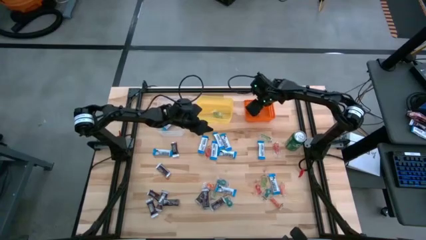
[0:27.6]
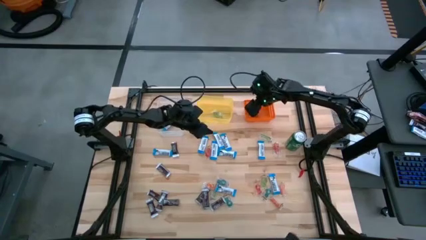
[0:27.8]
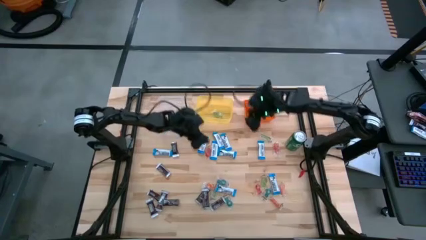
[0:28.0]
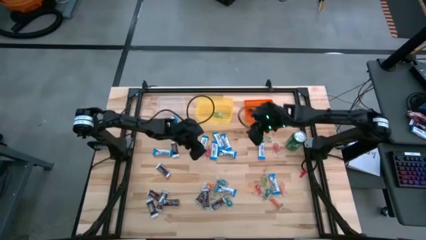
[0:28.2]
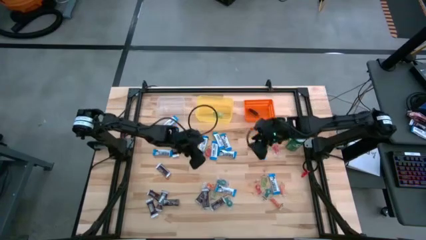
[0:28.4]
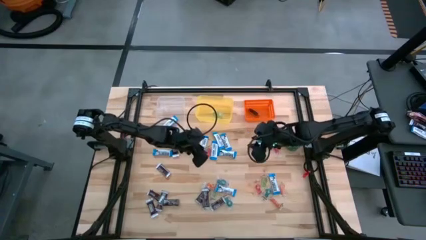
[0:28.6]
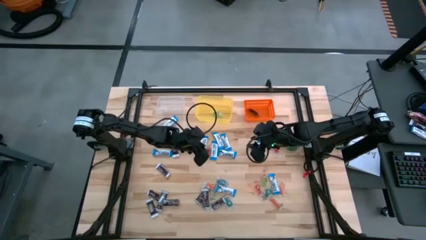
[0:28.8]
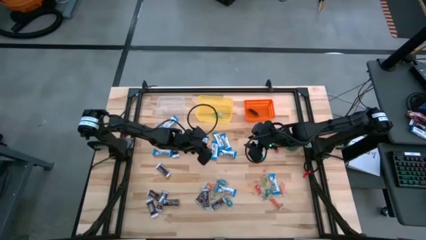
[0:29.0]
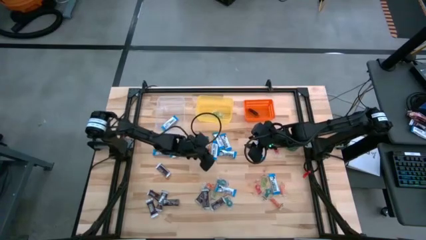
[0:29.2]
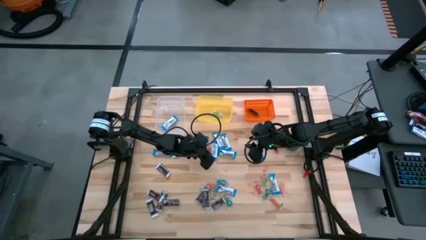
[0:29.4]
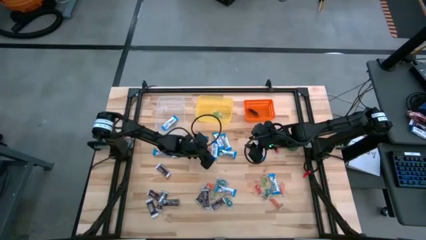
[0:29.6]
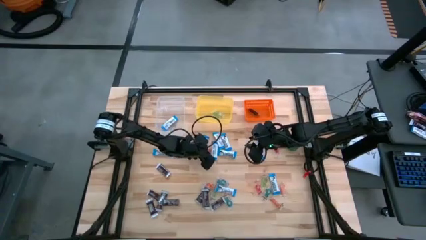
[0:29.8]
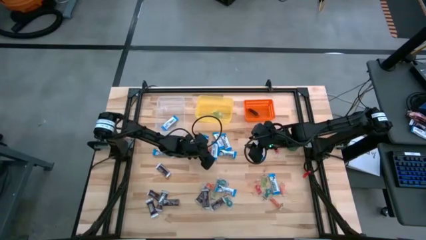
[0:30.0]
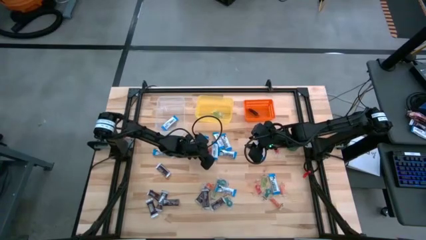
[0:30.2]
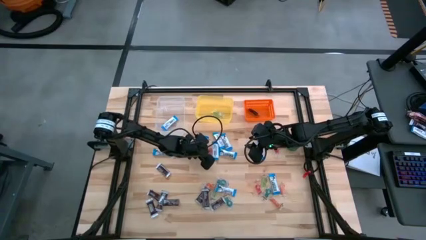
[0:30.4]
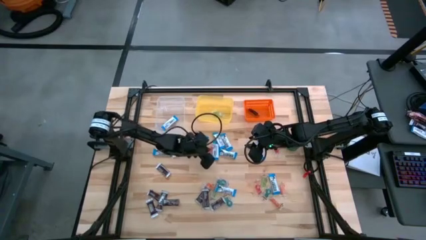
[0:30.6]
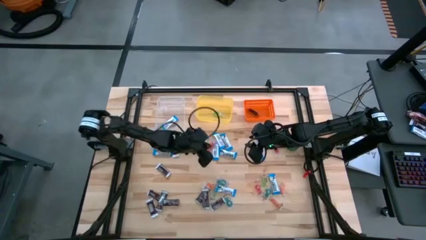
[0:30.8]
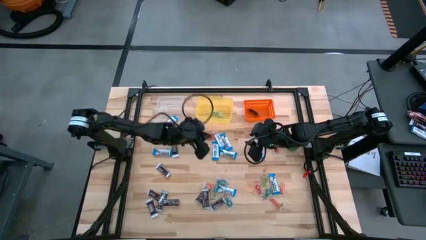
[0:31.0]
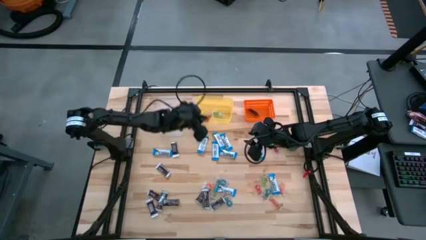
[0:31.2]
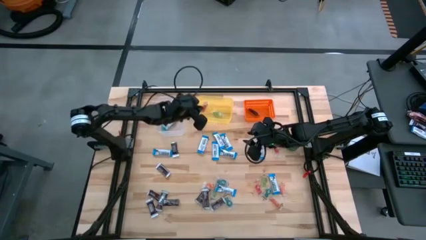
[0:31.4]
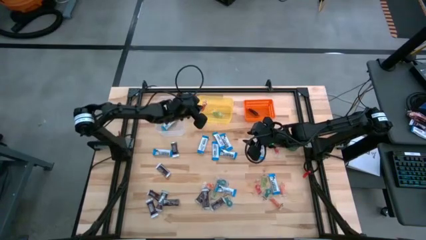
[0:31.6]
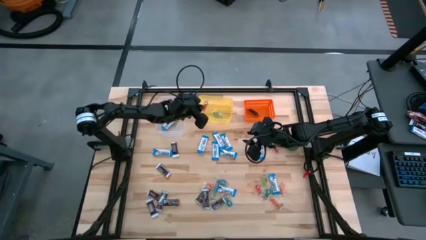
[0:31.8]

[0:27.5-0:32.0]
Task: Sort candy
Put the red gummy into the yellow bin

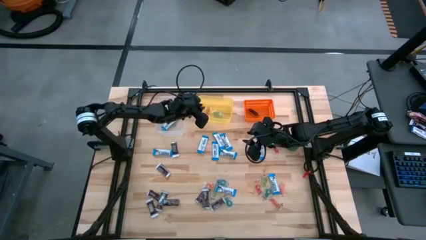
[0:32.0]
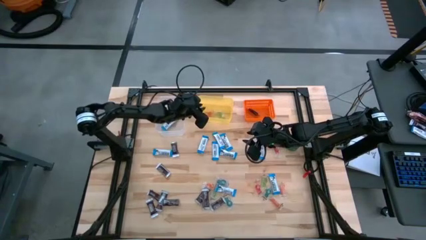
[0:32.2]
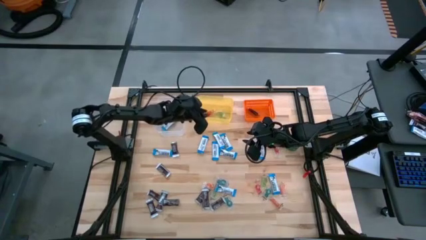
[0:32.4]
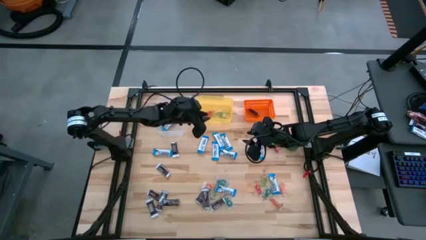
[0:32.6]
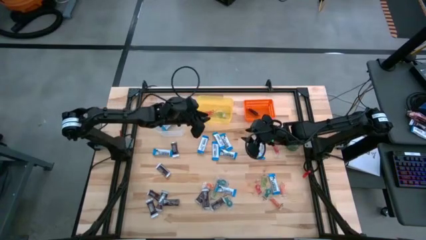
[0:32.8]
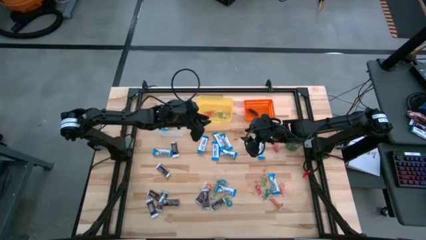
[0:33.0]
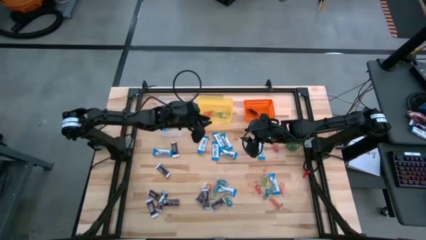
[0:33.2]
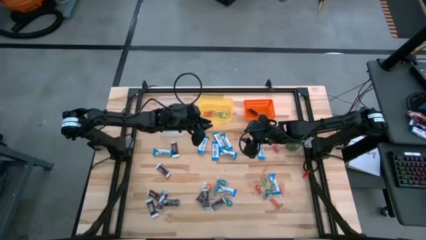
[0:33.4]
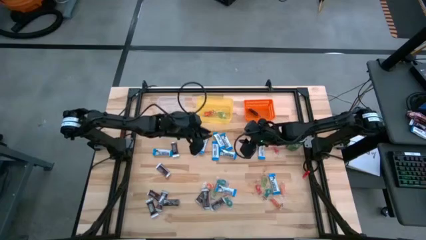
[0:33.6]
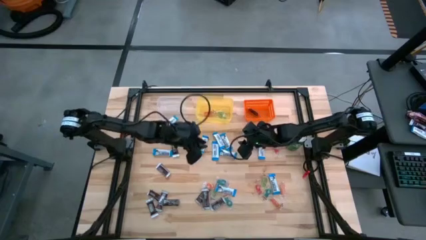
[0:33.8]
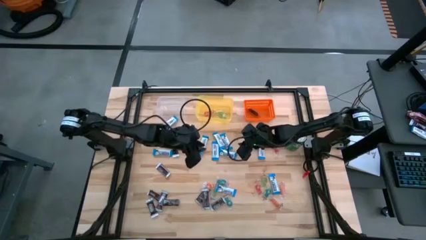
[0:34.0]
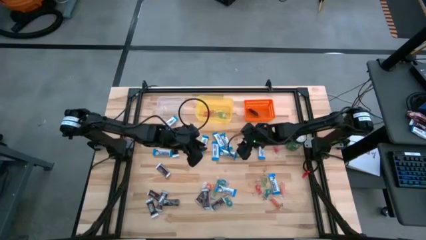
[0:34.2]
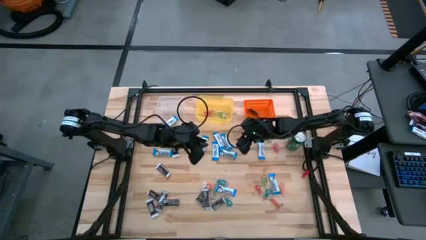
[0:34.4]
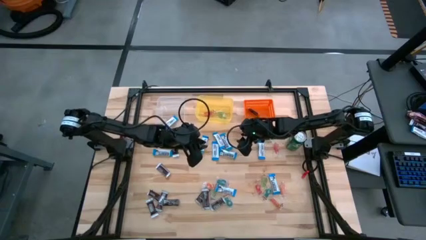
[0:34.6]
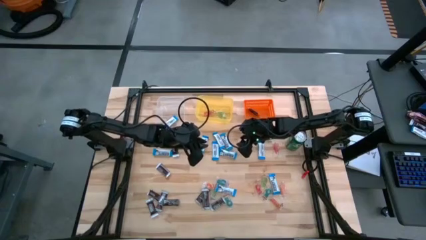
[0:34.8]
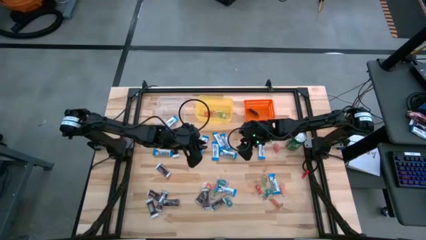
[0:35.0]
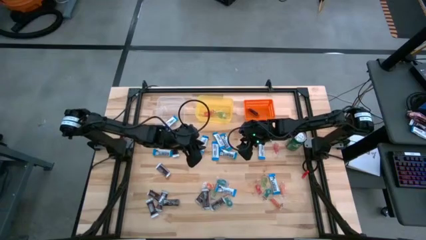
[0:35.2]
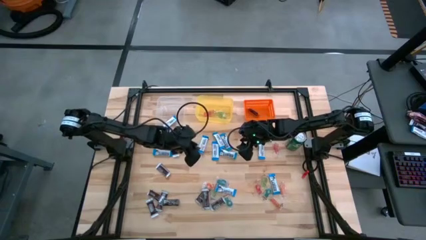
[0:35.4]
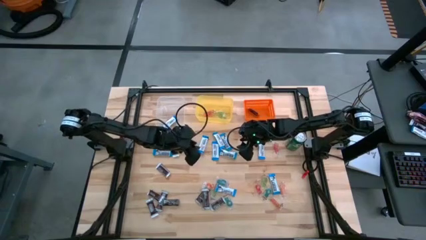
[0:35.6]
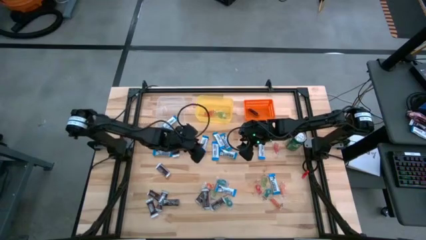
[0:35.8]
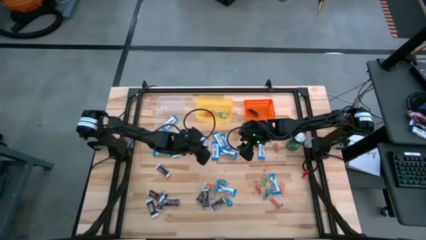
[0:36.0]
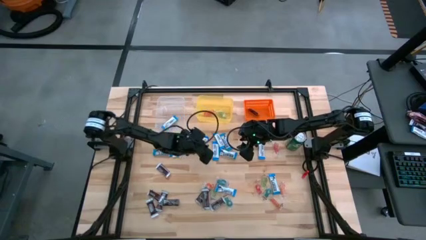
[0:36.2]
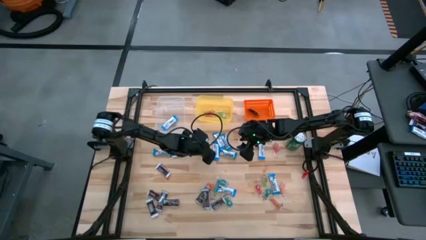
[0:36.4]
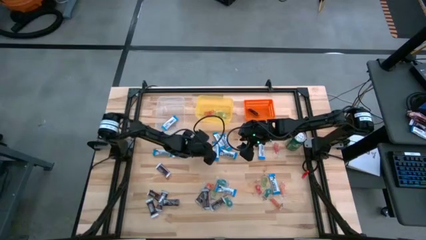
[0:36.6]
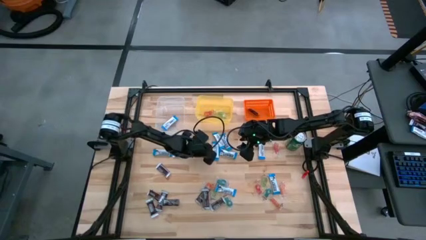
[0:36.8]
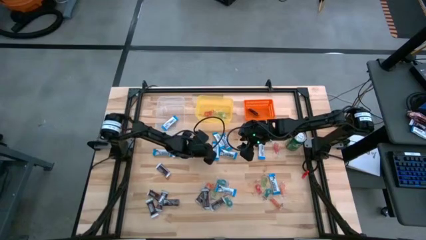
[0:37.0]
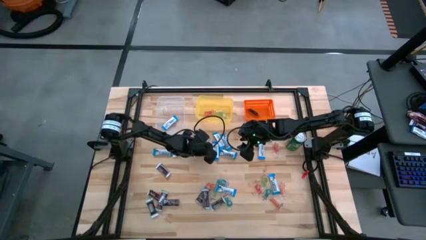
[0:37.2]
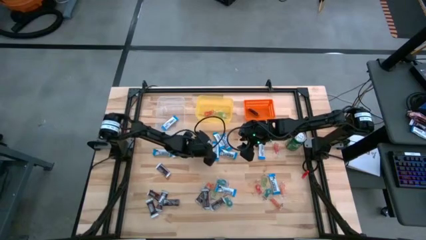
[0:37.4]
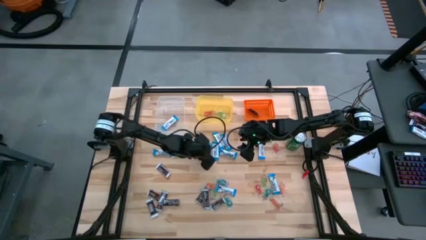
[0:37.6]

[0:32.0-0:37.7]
Put the white chocolate into the transparent bin

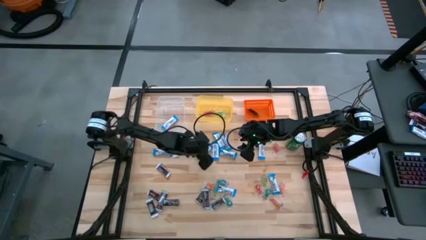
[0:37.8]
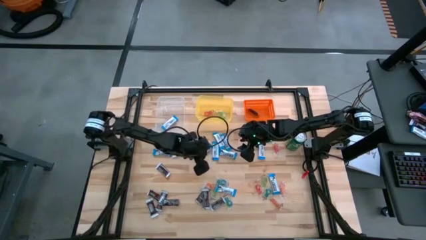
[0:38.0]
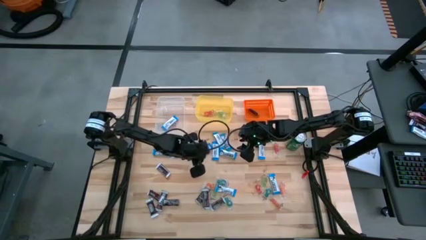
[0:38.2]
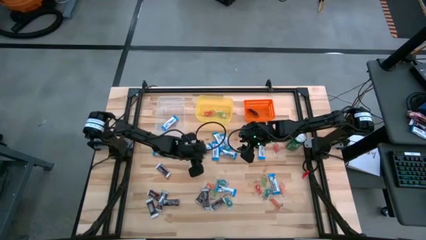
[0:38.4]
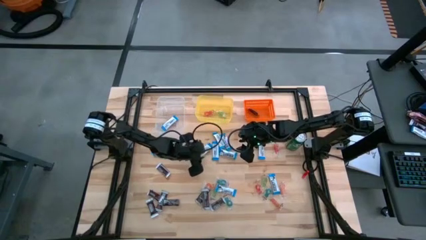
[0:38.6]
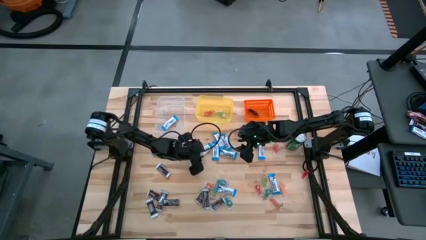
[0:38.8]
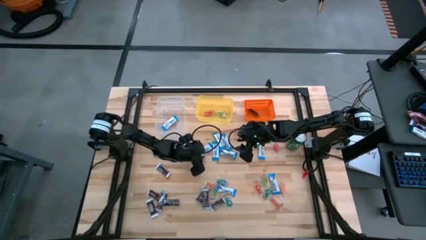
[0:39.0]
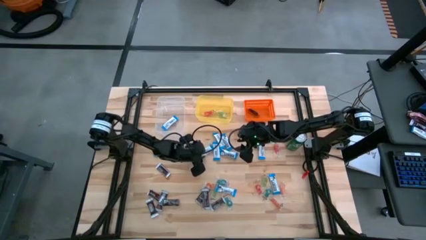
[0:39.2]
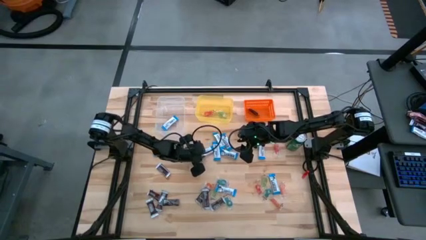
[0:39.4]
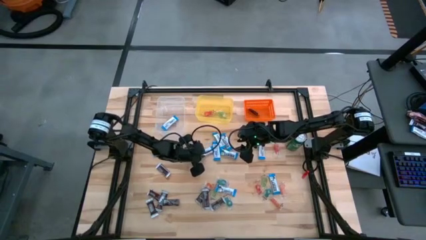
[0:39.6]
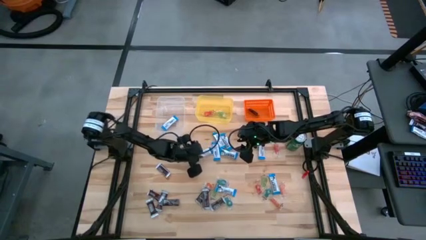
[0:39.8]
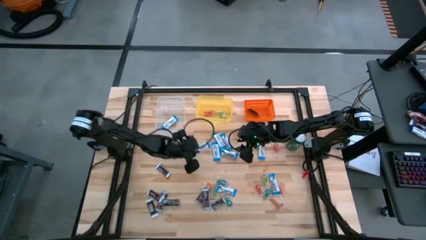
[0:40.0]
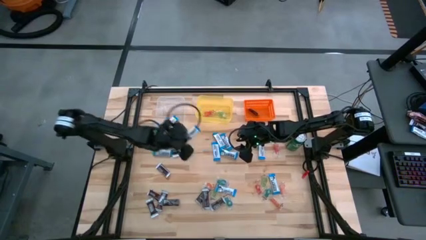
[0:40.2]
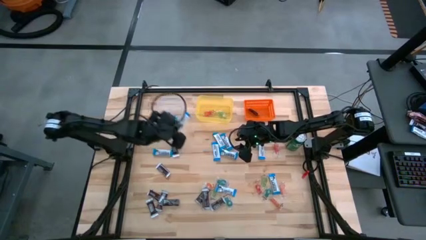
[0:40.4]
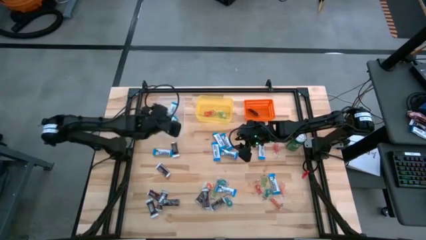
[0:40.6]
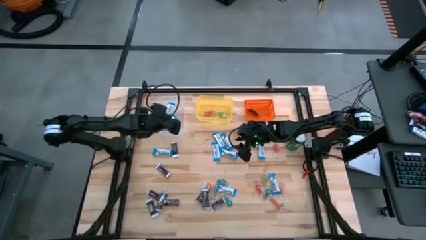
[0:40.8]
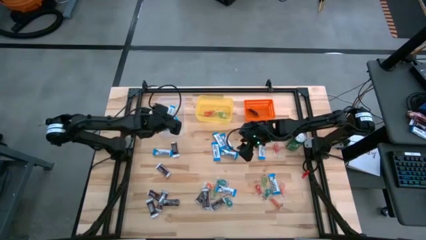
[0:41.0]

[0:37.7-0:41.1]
Put the white chocolate into the transparent bin

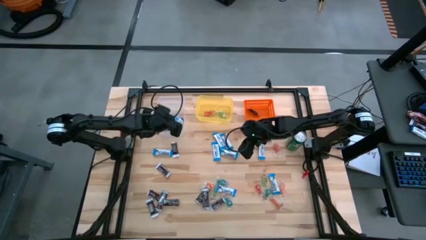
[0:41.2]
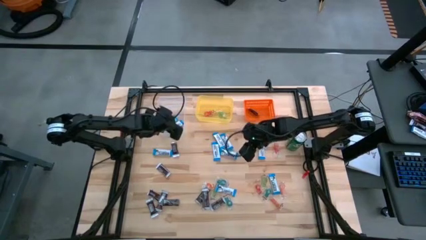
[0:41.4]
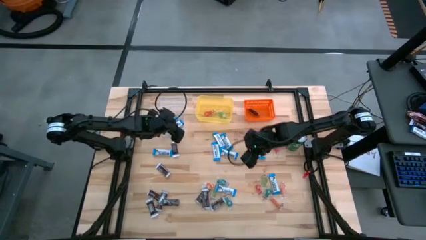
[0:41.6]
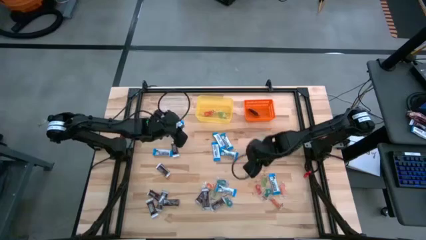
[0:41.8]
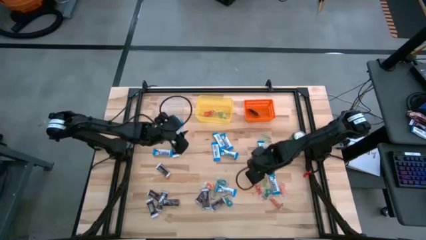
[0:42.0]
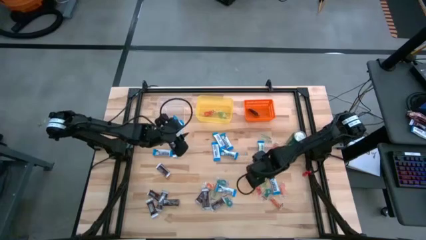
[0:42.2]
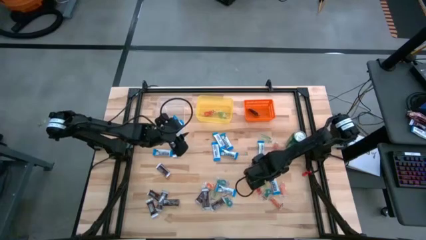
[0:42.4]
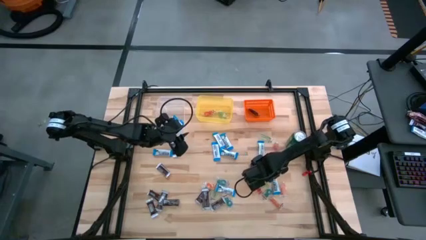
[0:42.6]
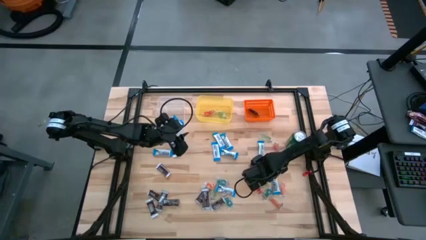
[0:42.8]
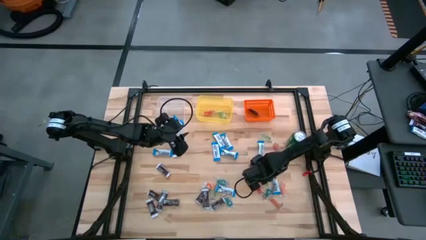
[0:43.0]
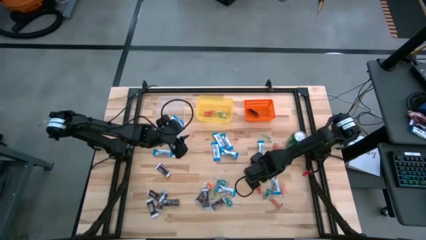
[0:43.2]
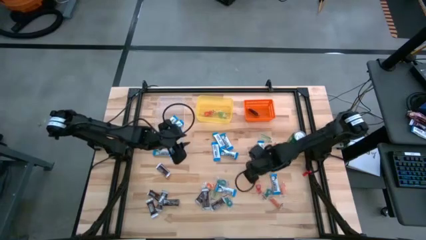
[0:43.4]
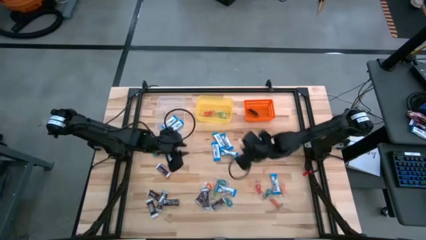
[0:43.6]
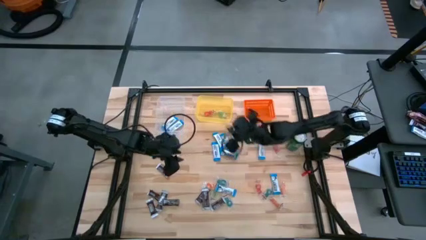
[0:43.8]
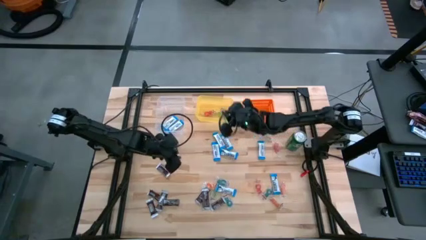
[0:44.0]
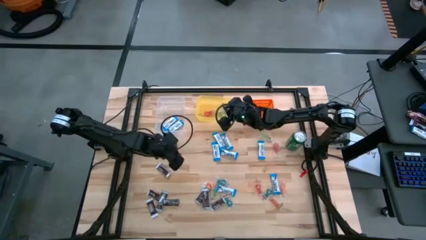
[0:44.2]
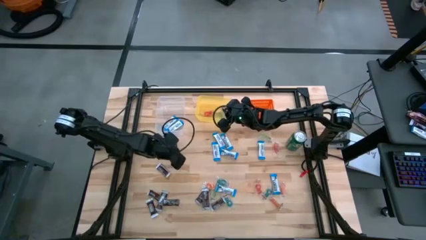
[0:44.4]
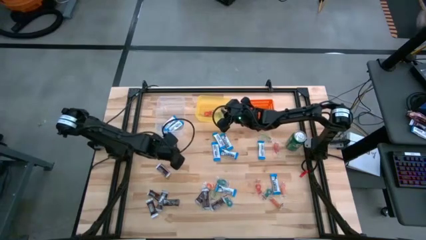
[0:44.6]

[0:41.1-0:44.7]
Put the green gummy into the yellow bin
